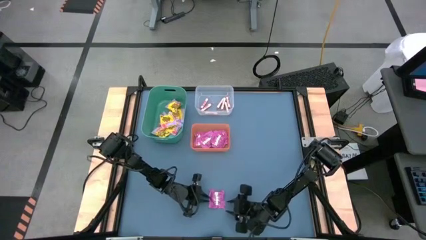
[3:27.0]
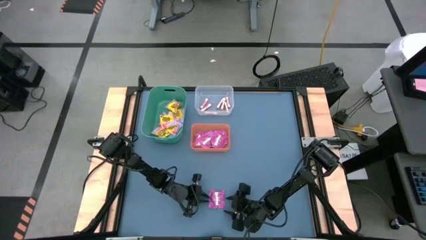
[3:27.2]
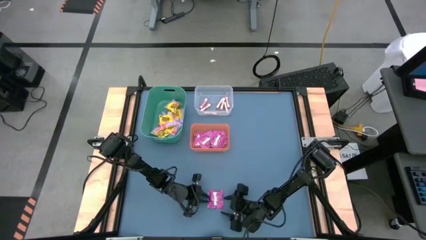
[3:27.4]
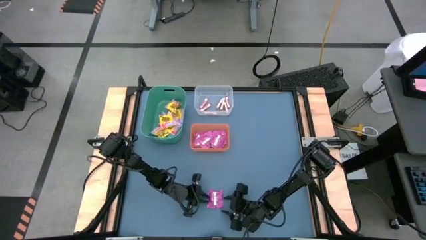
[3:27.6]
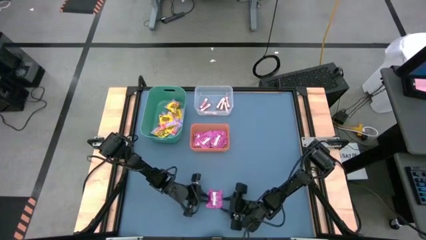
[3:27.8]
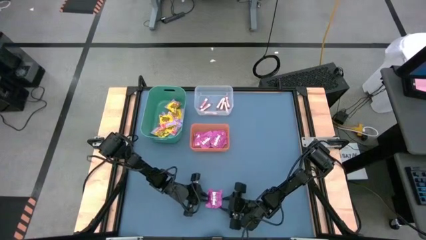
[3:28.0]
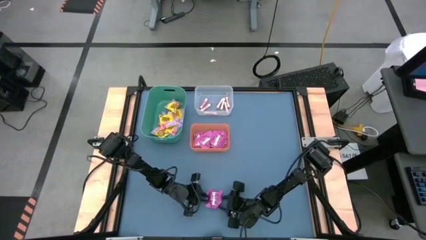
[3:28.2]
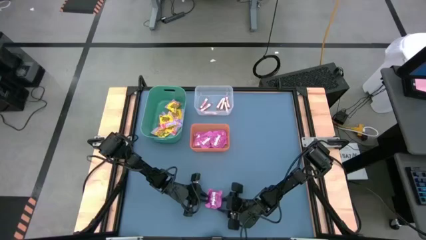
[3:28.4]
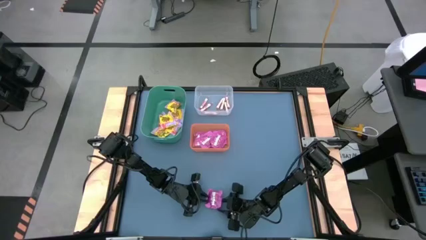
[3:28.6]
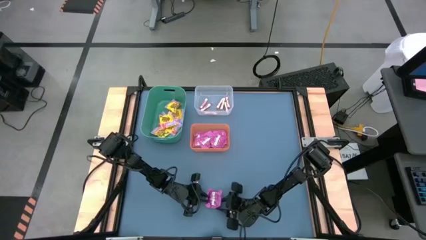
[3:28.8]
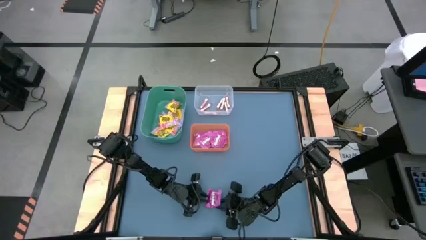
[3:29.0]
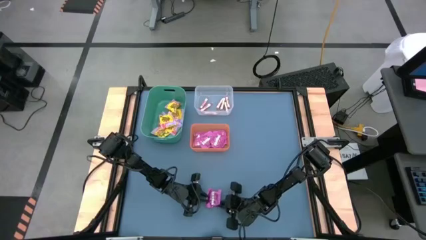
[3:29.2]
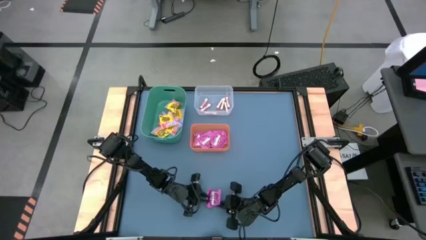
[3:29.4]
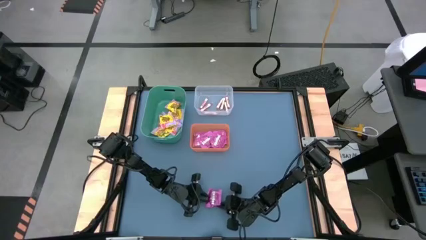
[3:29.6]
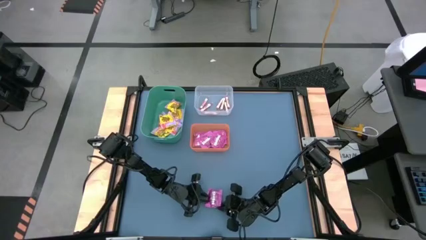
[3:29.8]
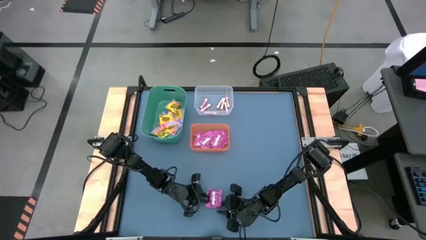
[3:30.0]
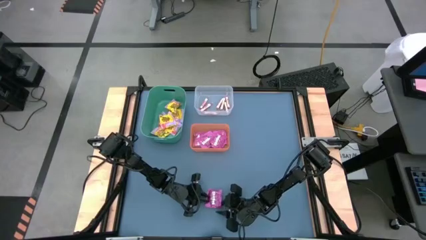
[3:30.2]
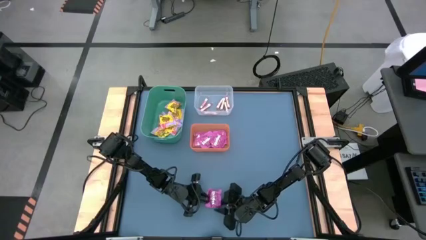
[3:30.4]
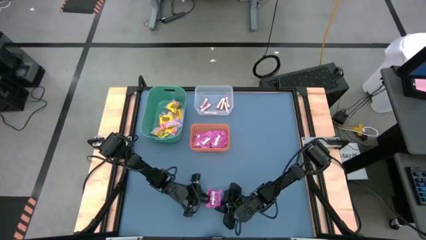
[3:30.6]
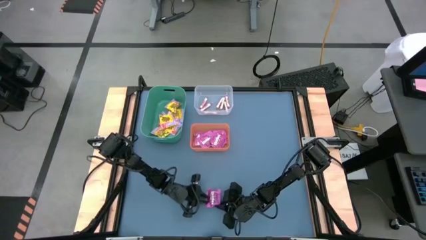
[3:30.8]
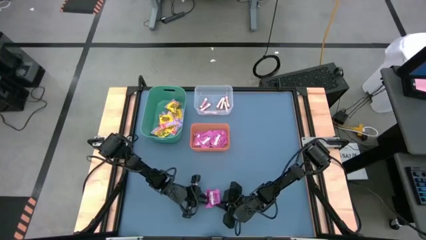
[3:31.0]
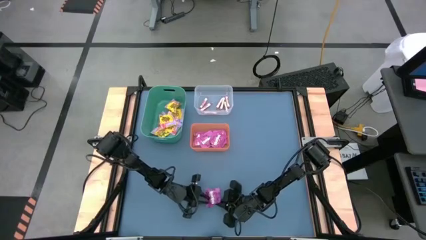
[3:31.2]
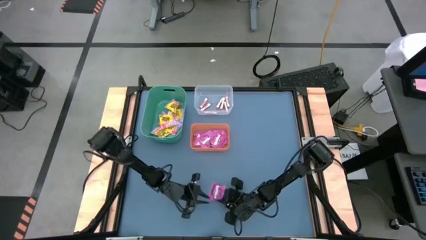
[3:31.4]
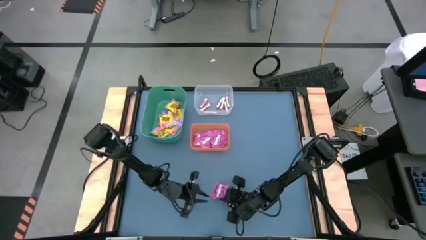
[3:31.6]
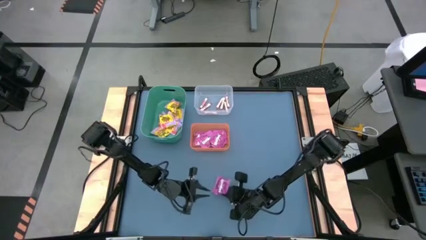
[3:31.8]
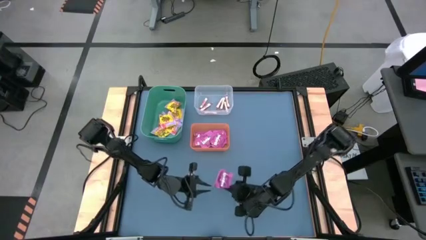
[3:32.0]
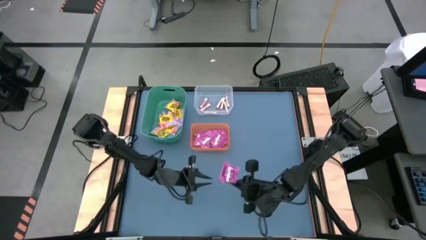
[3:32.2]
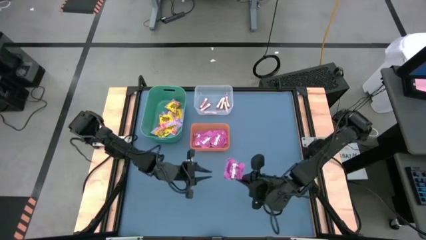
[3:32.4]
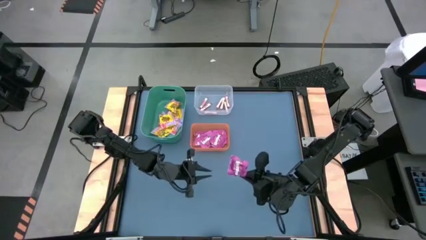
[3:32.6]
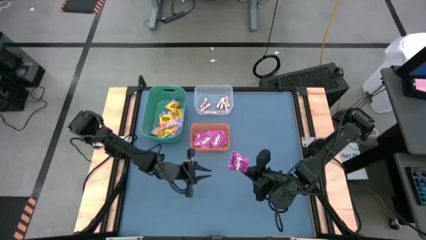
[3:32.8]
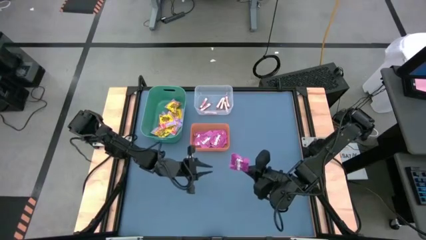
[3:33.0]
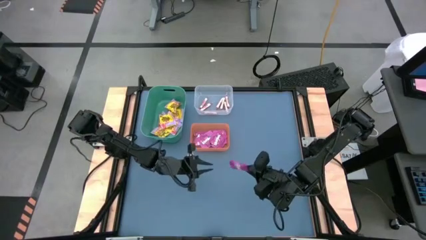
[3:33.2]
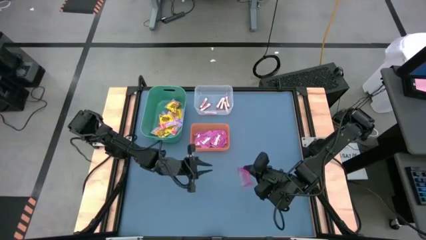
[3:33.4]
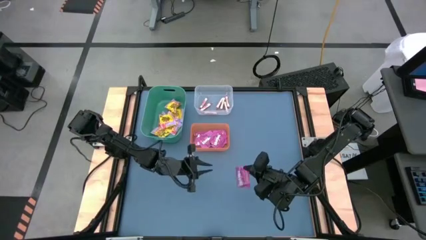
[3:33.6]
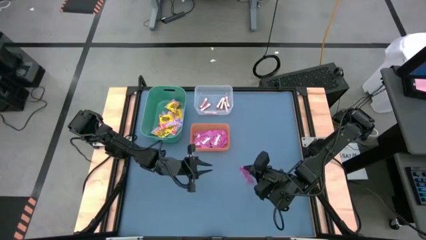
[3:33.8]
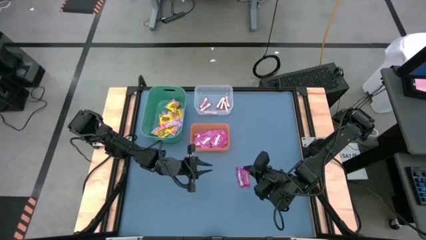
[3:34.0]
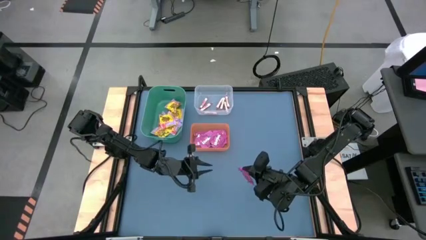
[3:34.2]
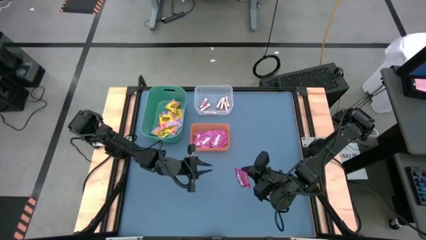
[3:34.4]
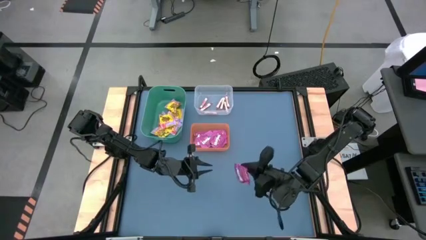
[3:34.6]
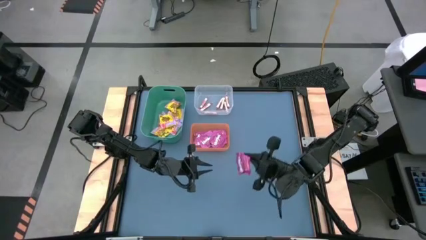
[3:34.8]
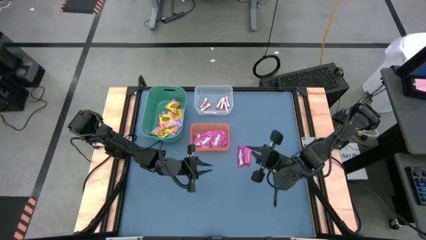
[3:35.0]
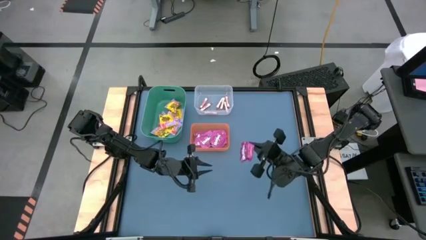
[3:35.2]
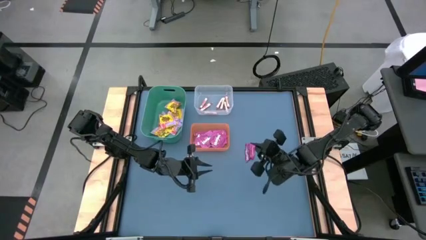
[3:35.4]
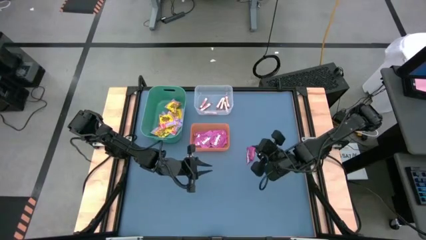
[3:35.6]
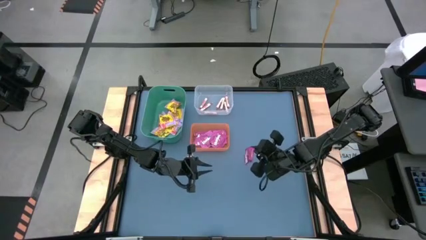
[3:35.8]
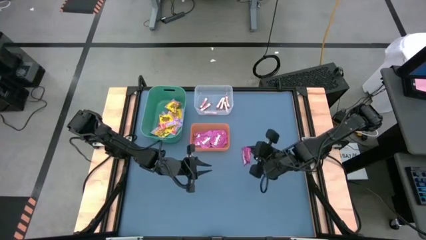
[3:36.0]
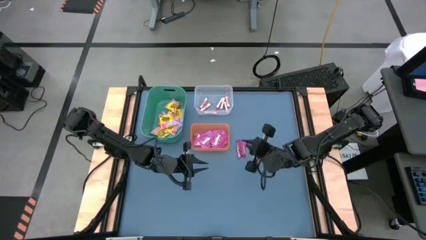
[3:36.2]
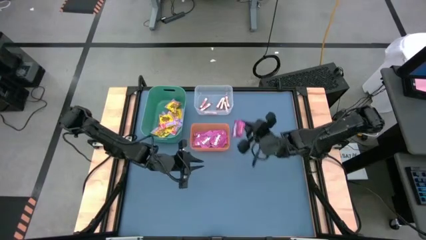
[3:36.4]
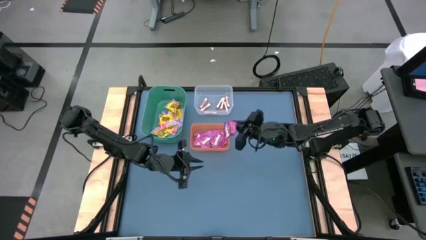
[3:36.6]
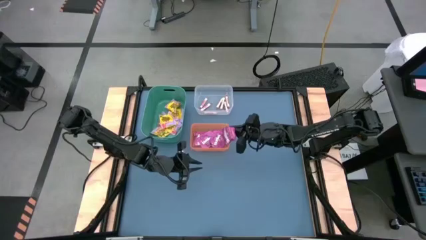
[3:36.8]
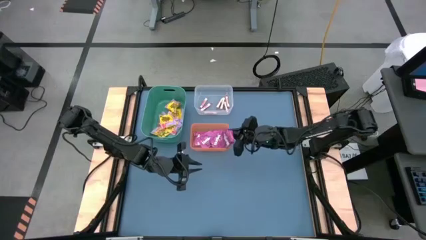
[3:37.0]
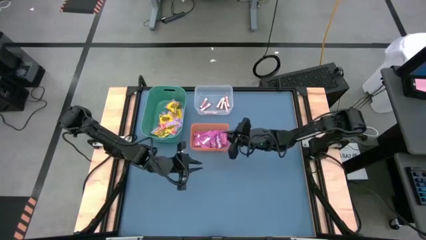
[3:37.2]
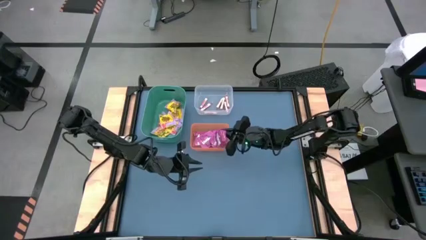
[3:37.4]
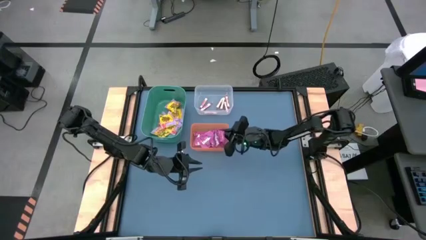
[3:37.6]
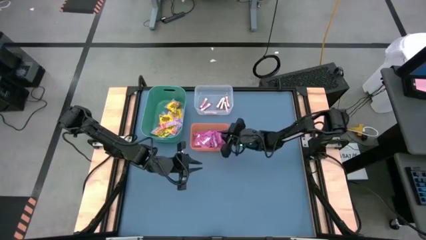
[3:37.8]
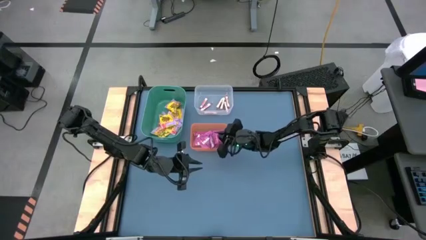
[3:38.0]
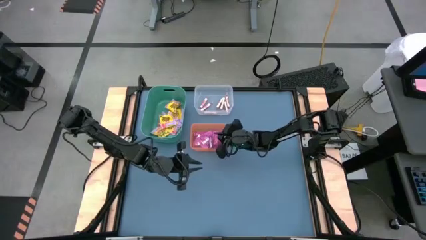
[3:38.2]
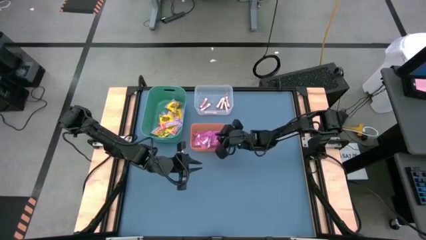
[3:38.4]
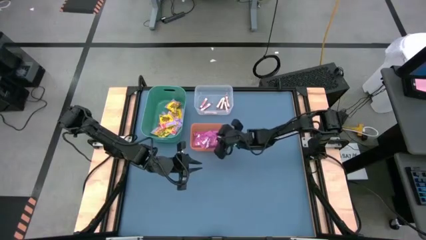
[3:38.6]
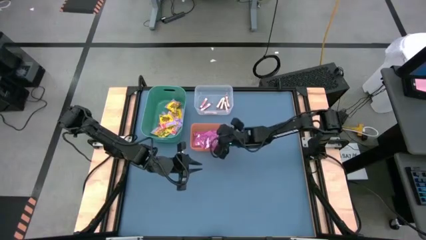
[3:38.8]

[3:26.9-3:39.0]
Task: Sort candy
Put the violet candy into the orange bin

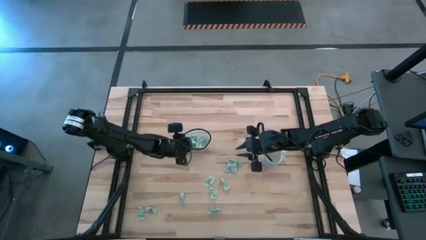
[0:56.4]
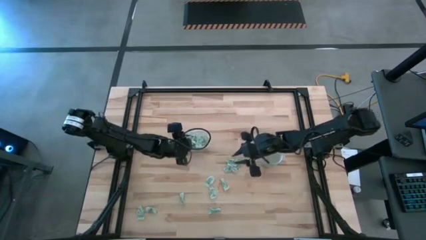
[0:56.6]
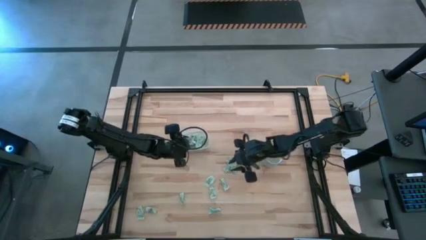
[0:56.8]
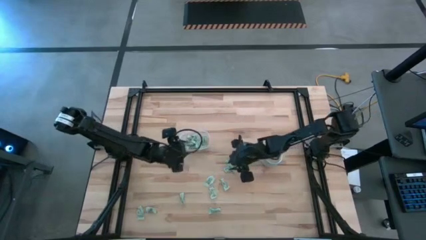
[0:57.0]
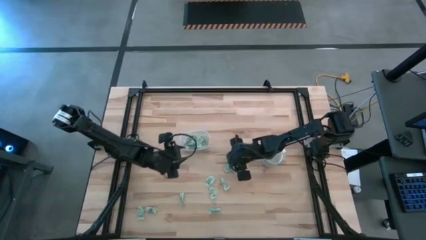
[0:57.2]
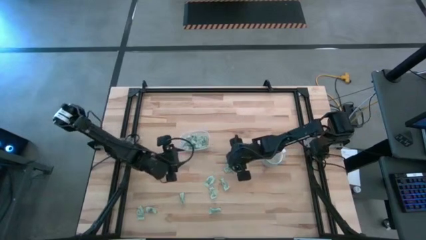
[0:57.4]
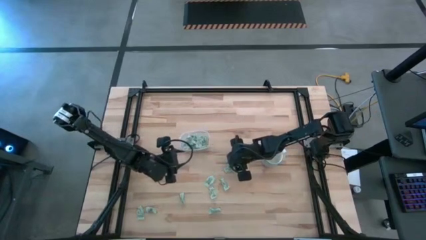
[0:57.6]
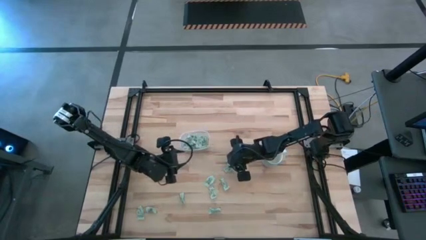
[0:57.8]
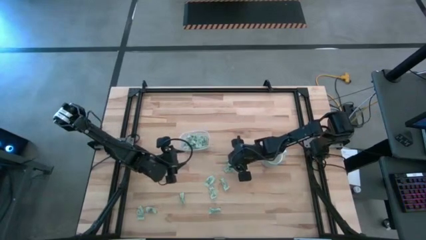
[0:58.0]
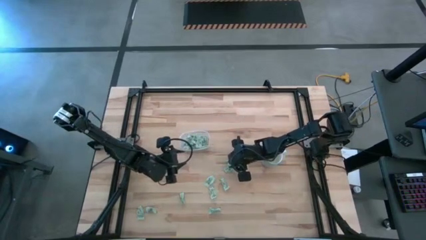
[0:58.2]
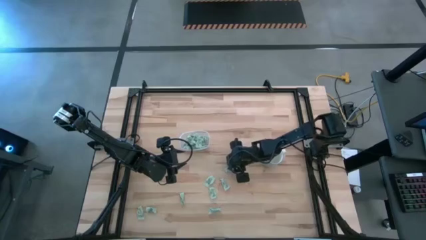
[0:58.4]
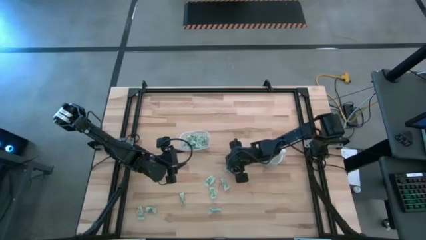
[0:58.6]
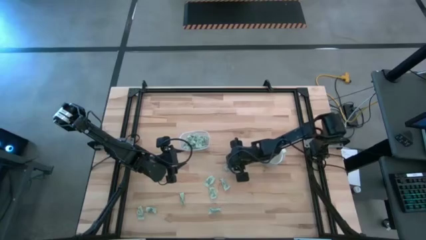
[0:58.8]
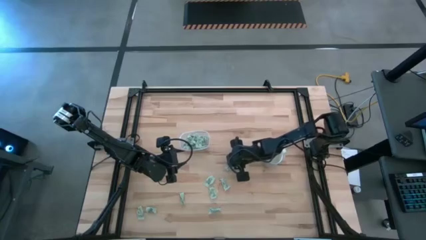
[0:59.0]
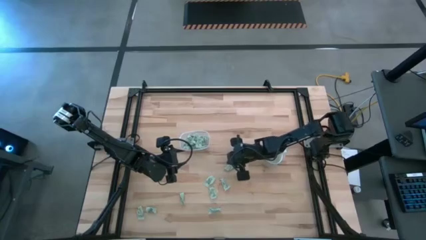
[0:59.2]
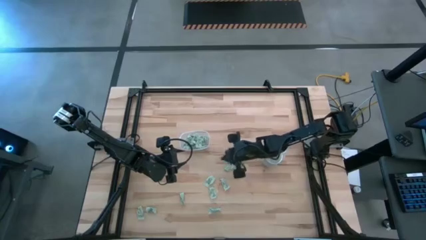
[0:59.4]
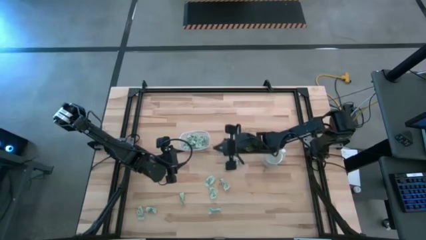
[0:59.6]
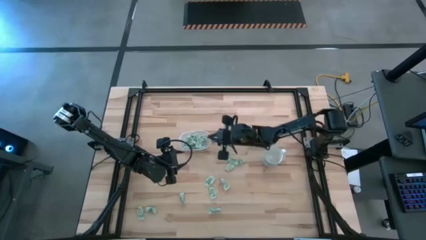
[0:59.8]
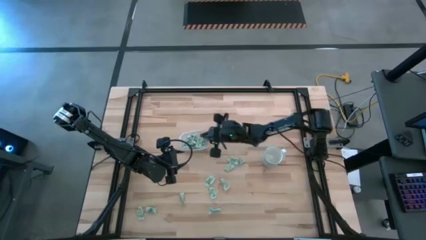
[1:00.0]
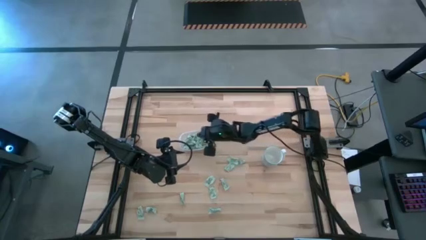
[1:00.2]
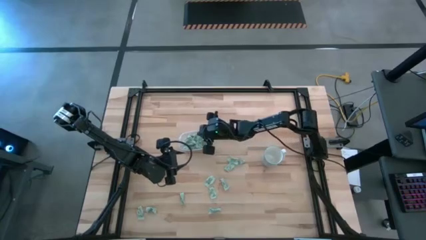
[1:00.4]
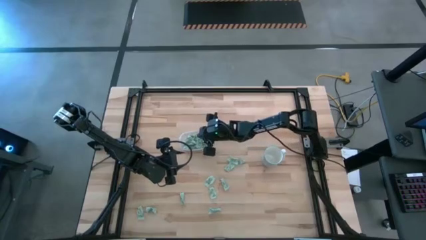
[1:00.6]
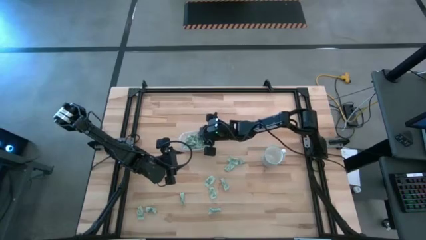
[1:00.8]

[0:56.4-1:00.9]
Task: Pick and place Stevia / Truvia into bins
Put the stevia packet into the transparent bin

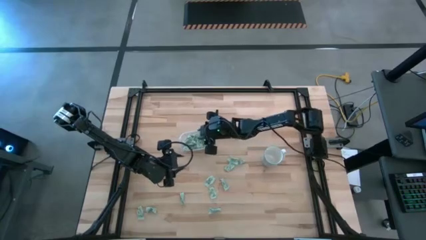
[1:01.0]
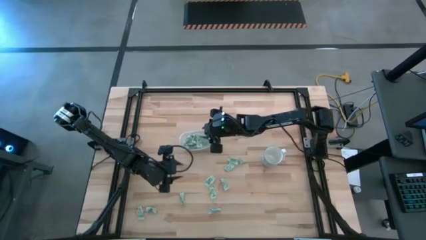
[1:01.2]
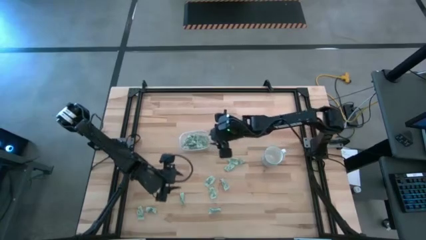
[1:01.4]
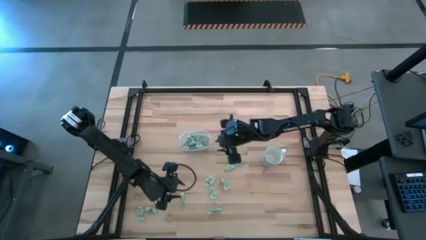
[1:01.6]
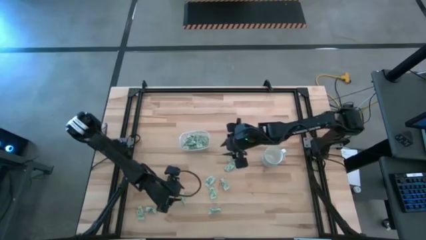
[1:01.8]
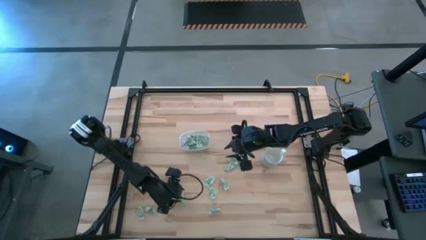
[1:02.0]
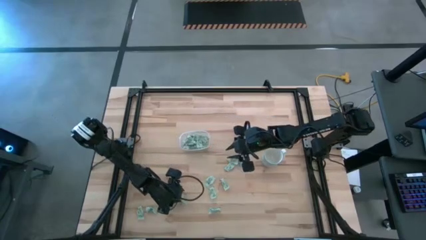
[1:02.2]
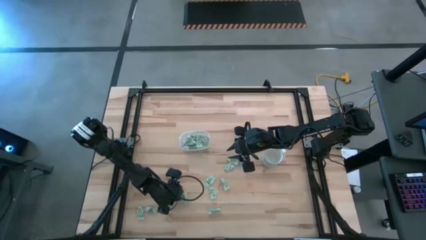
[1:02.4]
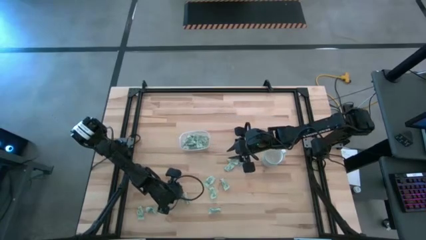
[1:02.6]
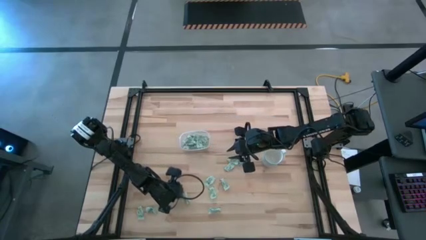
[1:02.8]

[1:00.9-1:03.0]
Put the stevia packet into the transparent bin
